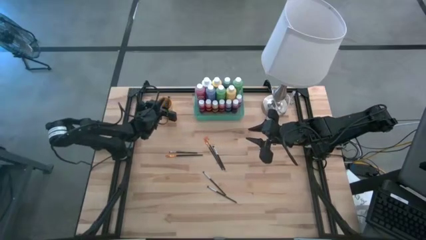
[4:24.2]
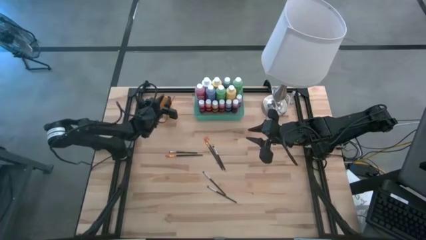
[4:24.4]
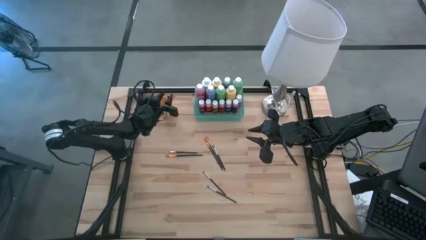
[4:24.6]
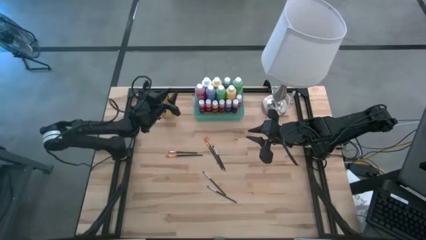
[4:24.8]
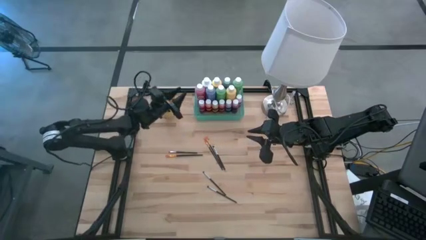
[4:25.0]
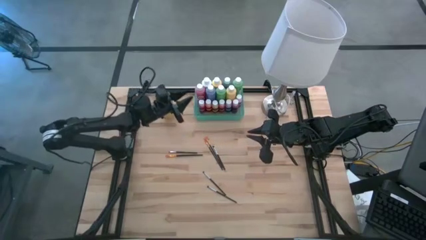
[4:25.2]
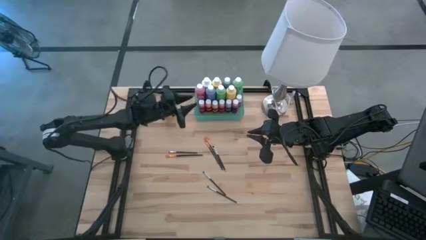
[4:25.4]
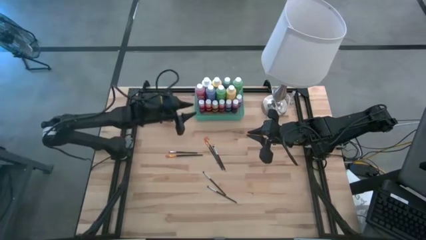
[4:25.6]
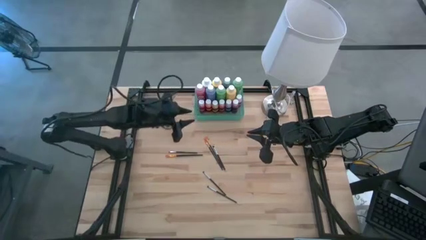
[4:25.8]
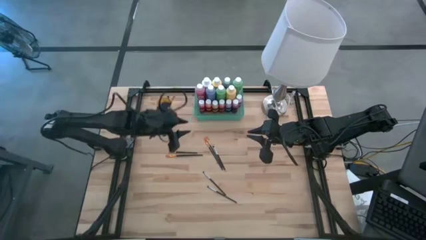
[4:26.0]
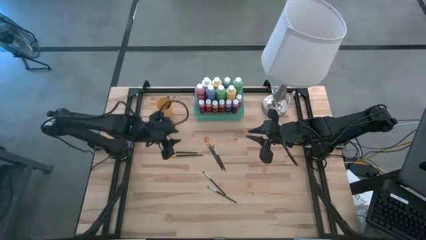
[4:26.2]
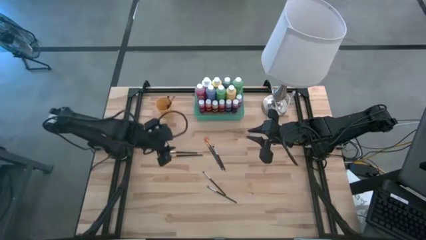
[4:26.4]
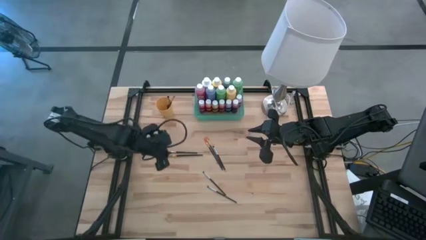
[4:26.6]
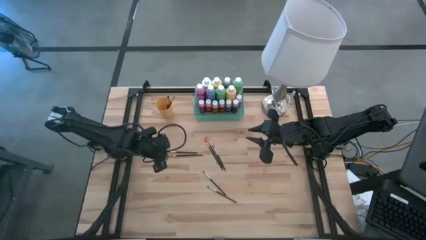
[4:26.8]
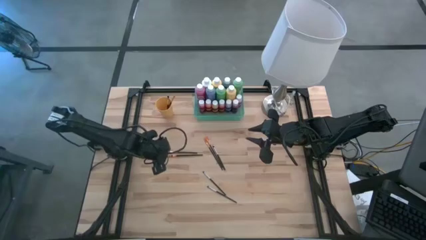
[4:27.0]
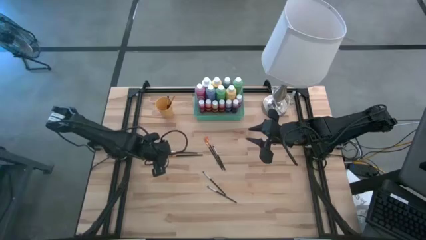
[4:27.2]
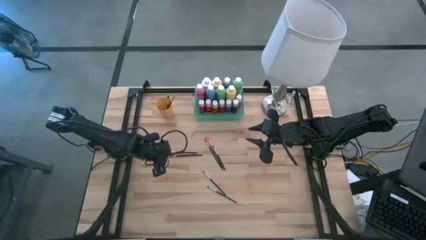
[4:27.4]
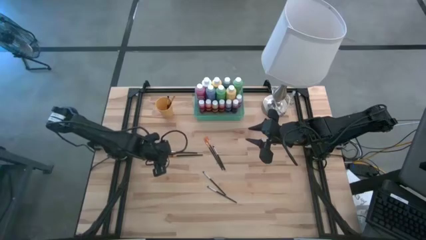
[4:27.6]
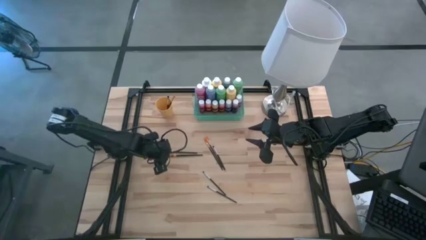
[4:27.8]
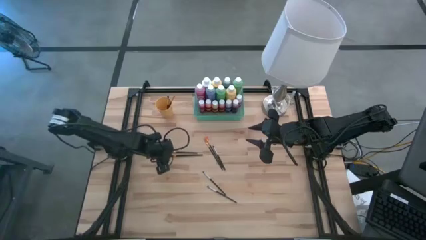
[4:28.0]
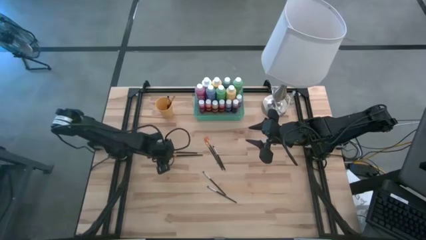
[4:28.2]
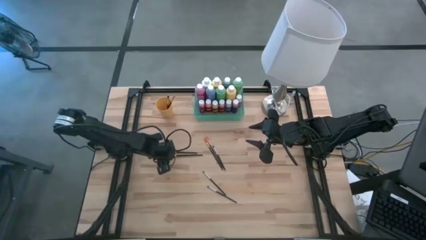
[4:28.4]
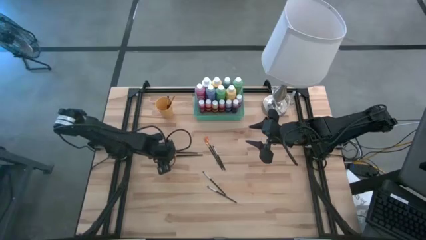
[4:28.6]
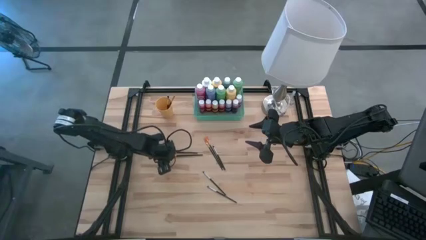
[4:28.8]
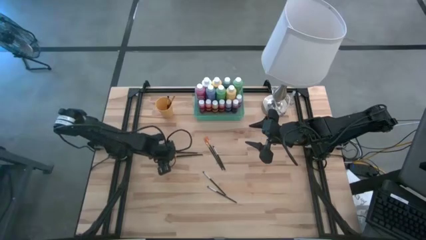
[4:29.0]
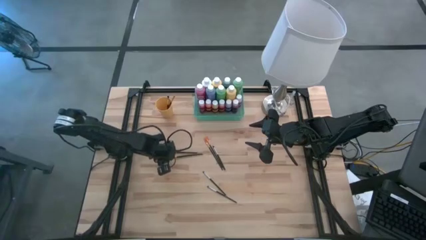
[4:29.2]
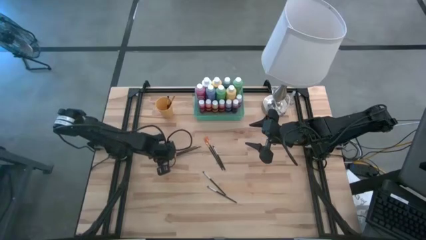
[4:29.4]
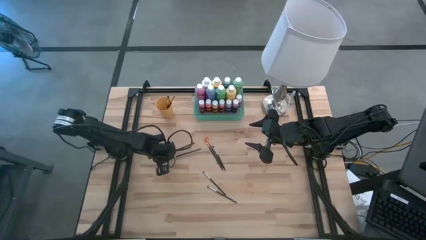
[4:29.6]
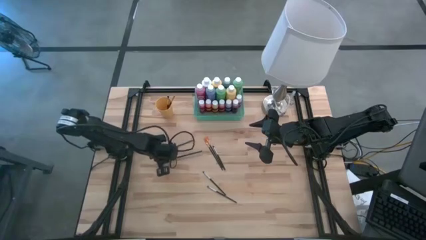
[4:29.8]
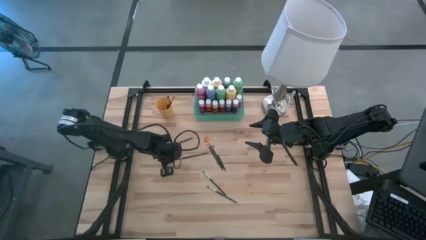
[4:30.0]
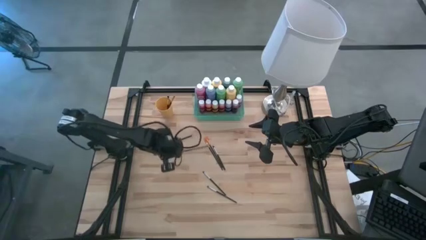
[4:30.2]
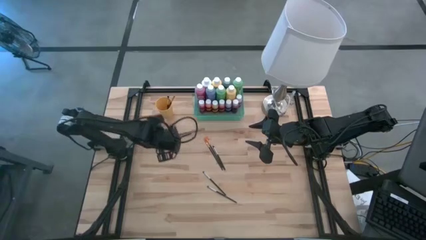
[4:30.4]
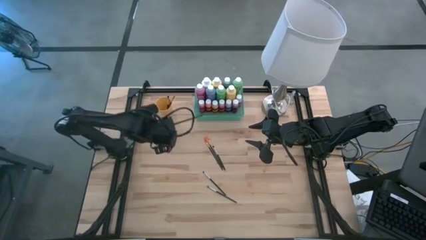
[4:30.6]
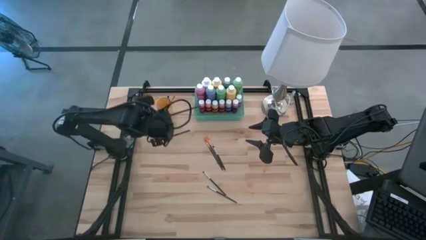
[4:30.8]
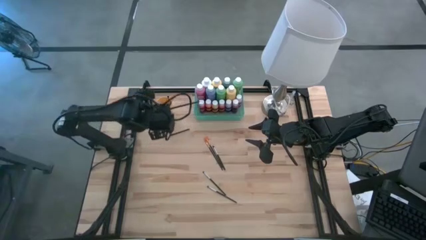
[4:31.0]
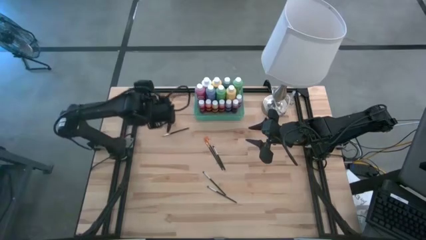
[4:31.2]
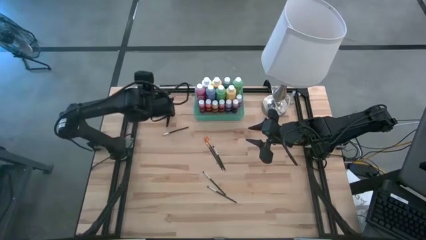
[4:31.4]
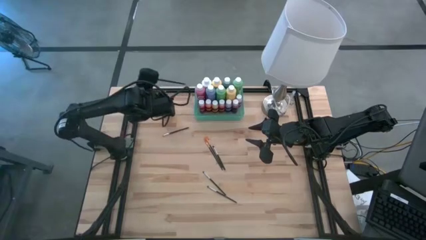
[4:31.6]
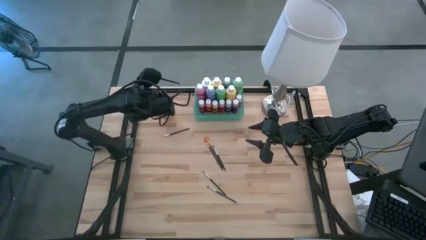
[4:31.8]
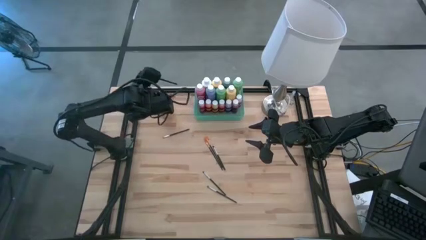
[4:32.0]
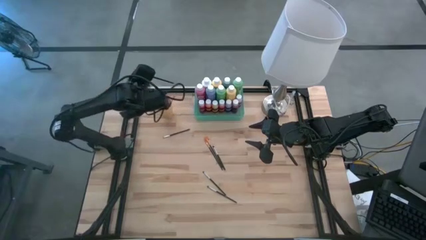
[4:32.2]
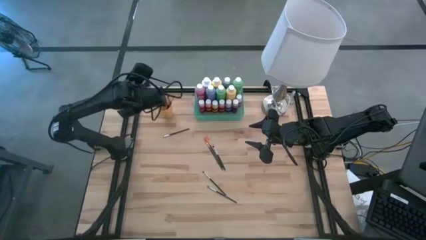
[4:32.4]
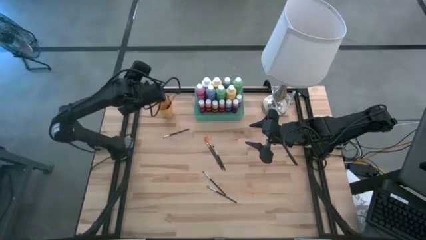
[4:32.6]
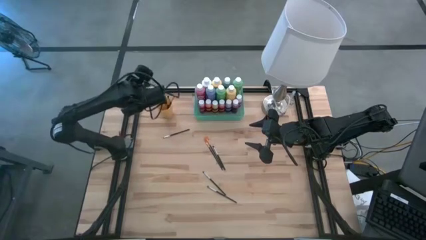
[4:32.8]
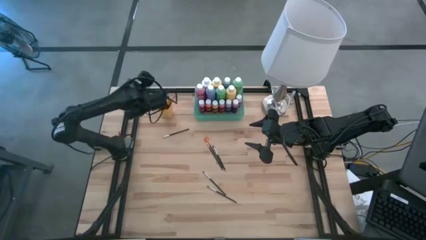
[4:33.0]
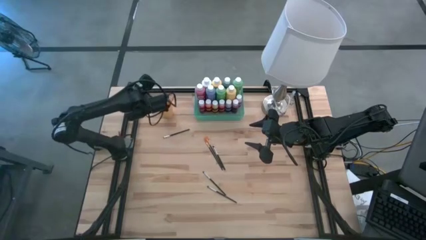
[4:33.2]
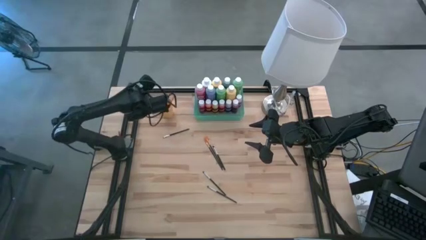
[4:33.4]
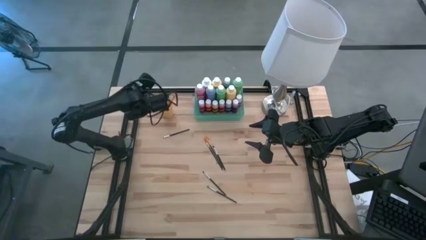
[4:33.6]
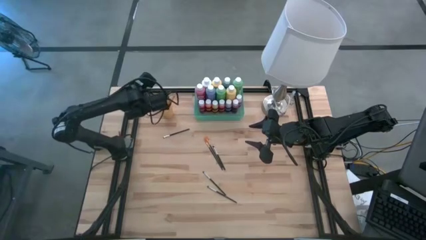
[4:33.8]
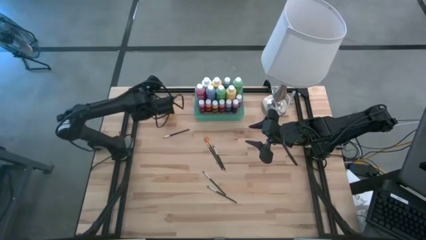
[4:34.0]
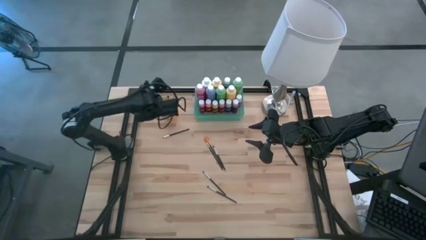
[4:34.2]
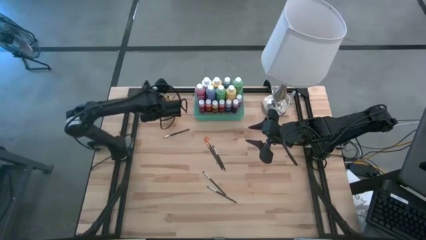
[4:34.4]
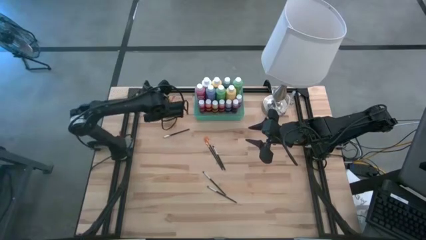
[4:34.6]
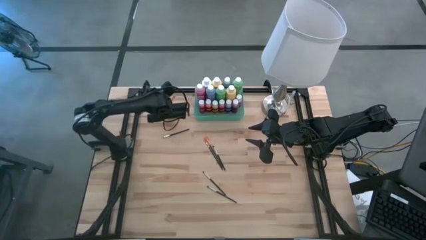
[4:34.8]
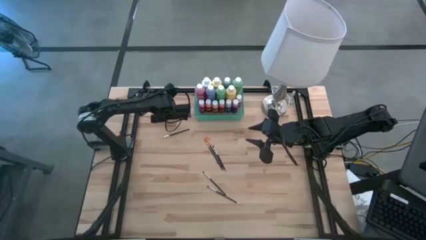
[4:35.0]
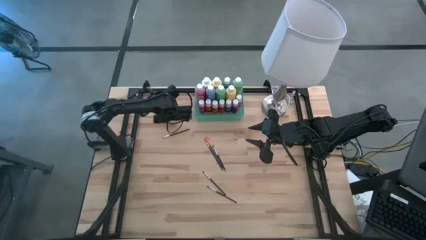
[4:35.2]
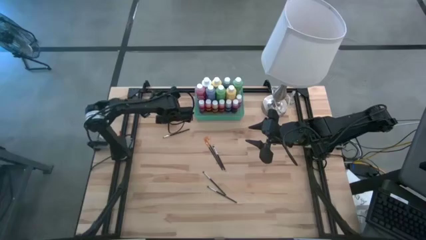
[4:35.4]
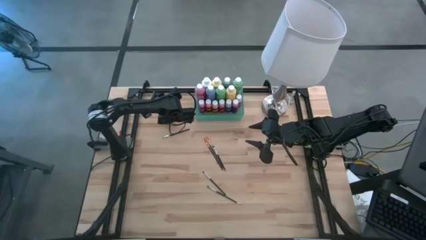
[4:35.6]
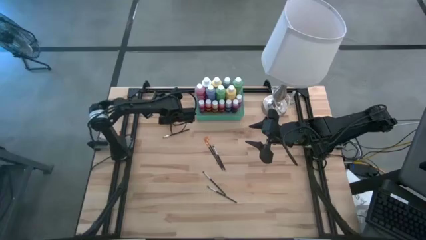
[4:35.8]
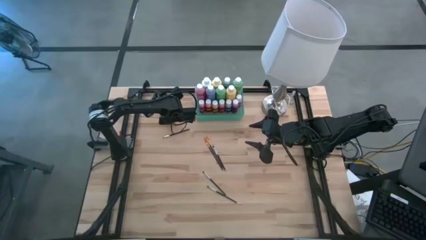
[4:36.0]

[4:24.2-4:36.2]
Task: Pick & Place Paint Supplies
Put the gold paintbrush into the orange cup

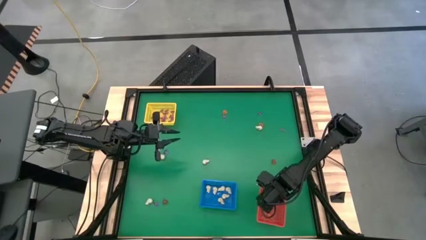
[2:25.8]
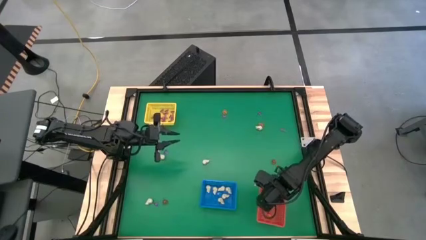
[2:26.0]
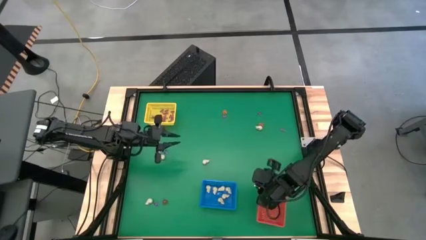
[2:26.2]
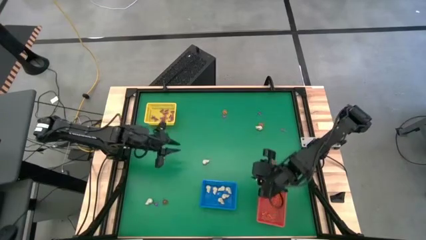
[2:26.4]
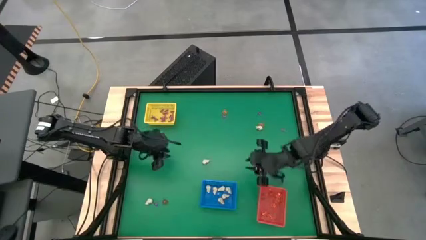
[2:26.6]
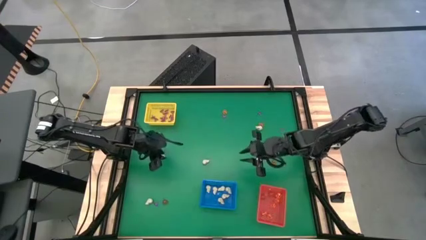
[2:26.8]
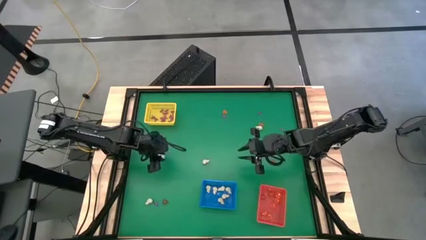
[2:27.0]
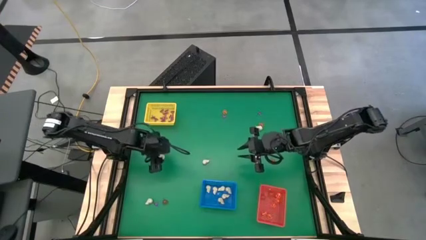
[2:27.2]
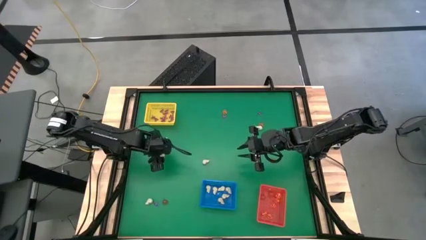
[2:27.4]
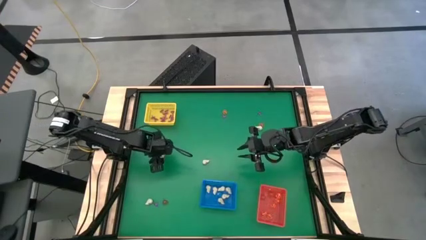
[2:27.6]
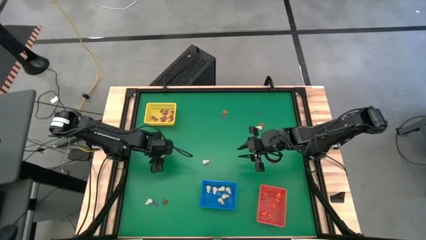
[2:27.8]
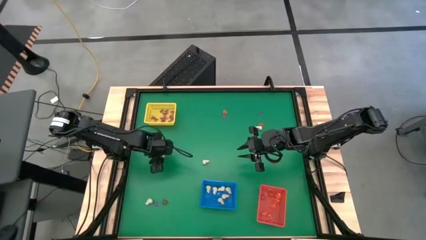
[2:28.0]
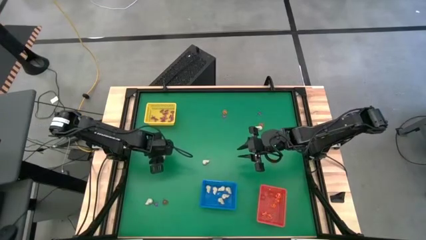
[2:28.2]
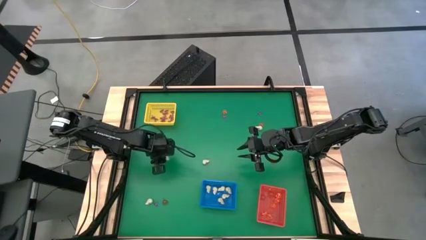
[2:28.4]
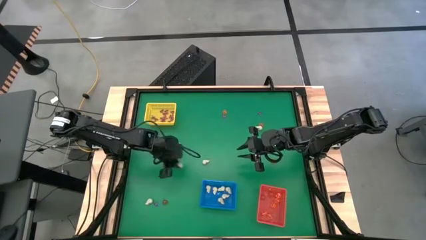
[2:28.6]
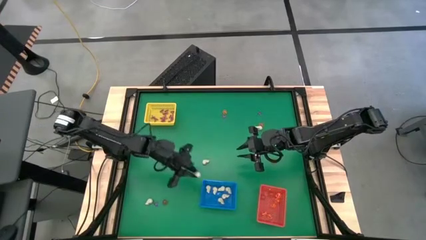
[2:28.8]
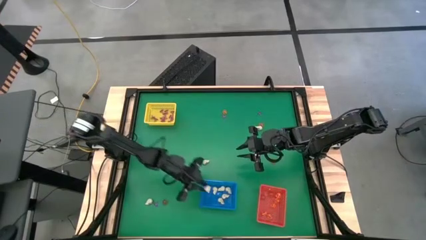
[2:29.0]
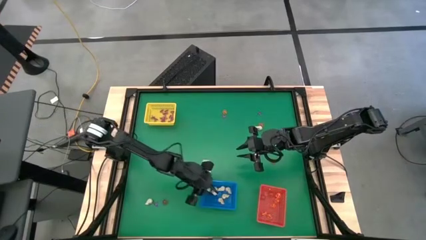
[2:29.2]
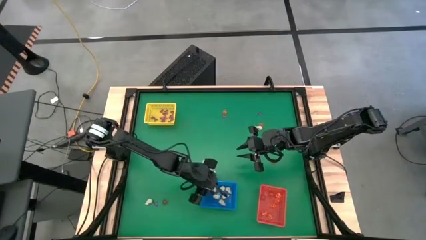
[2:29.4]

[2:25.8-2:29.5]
Task: Sort Halloween decoration
Put the white skull toy into the blue basket

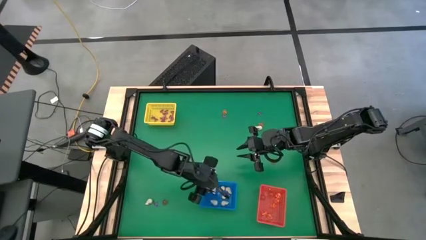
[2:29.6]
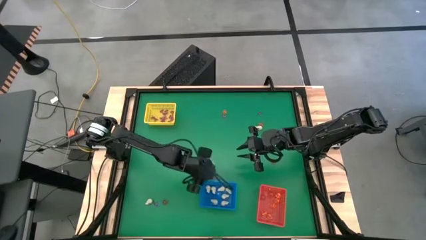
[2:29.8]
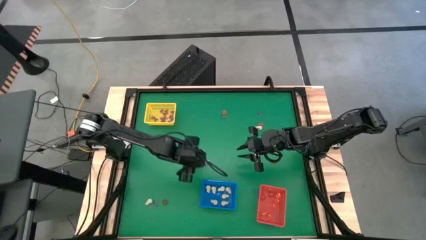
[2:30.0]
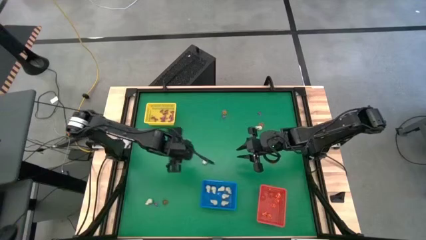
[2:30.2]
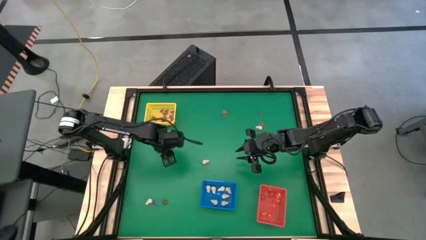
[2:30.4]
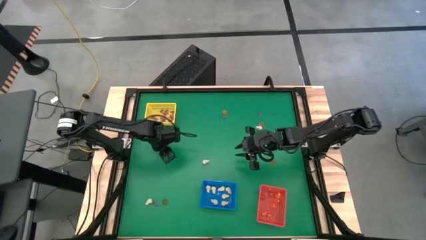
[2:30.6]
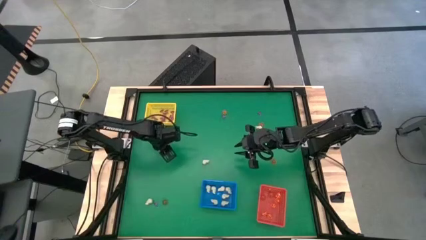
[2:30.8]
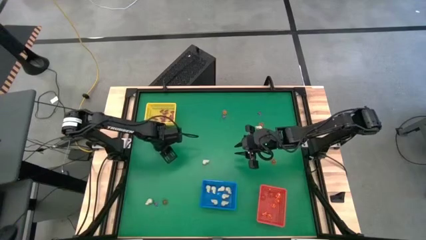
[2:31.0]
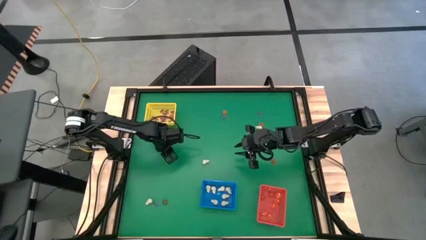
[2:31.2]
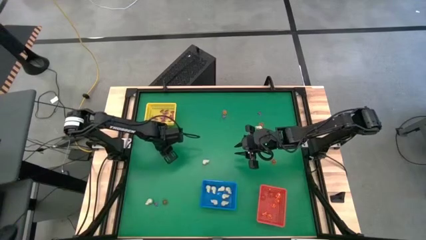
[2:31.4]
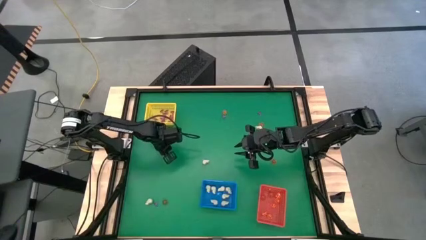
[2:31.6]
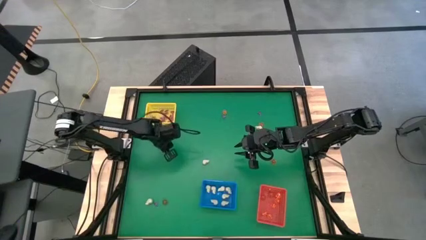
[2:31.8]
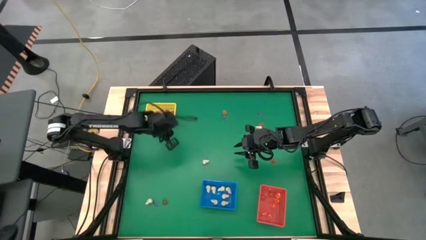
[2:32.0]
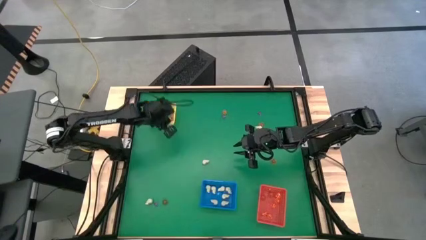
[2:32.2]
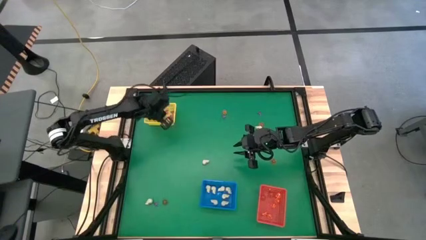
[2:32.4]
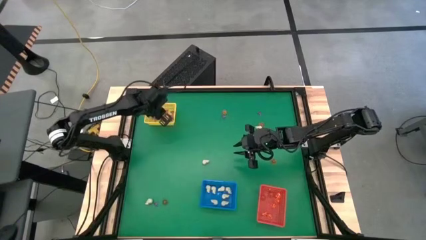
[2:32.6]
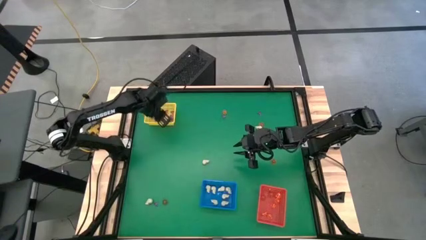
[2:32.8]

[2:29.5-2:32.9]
Put the purple witch hat toy into the yellow basket
